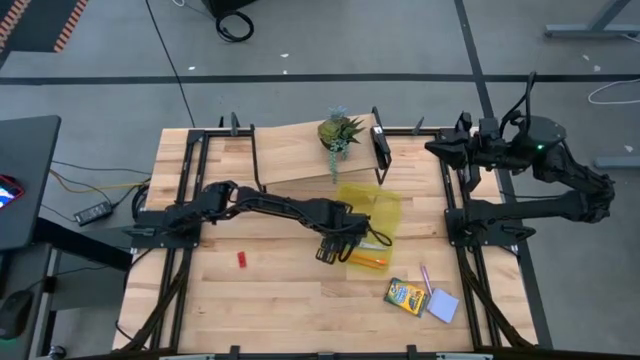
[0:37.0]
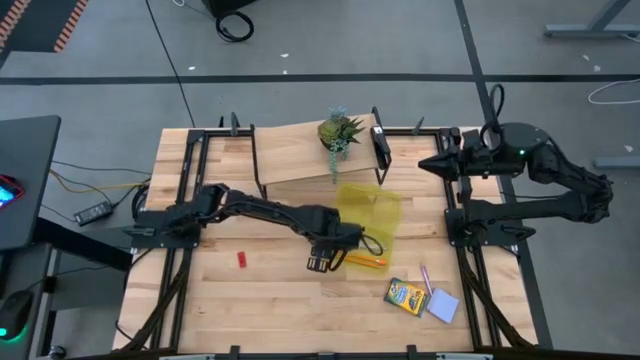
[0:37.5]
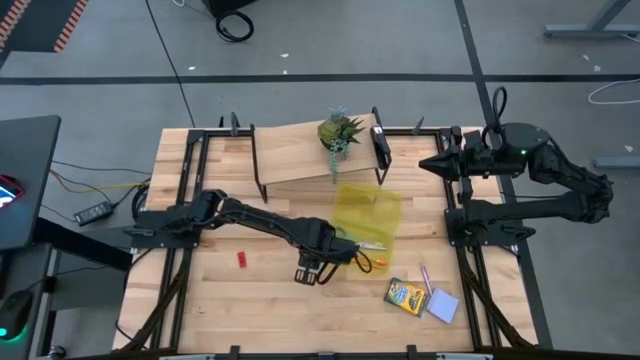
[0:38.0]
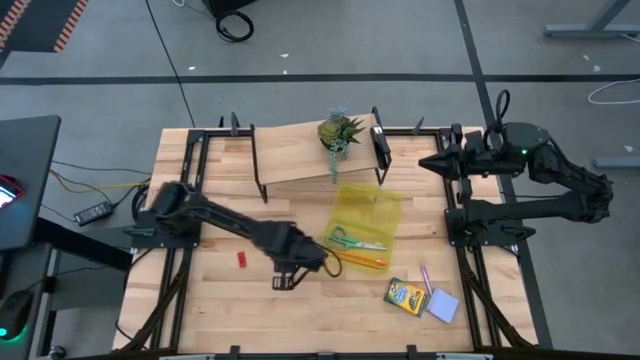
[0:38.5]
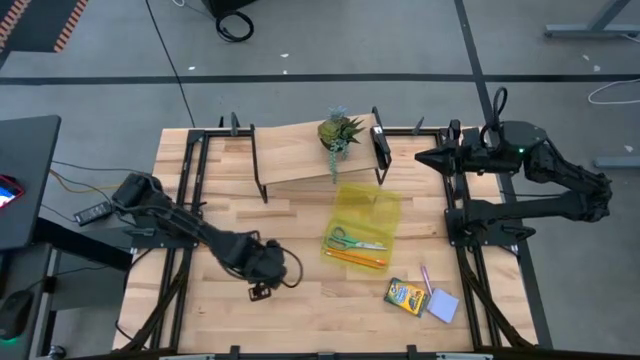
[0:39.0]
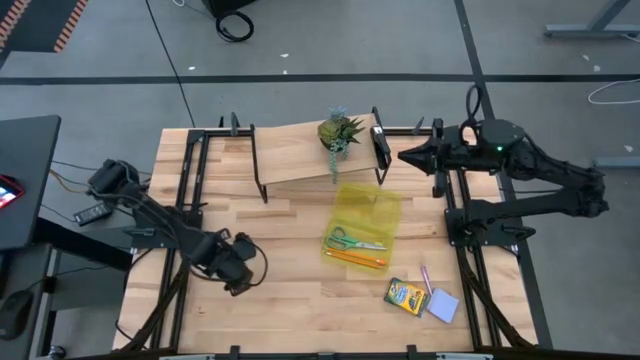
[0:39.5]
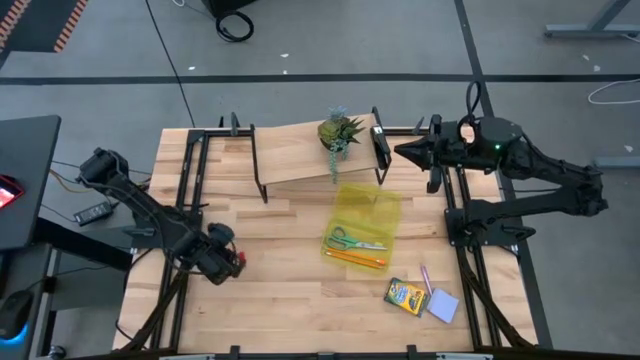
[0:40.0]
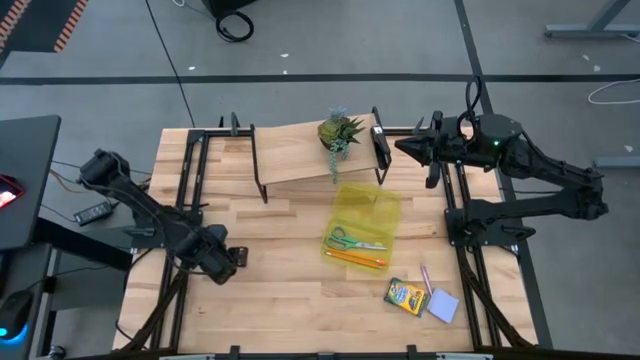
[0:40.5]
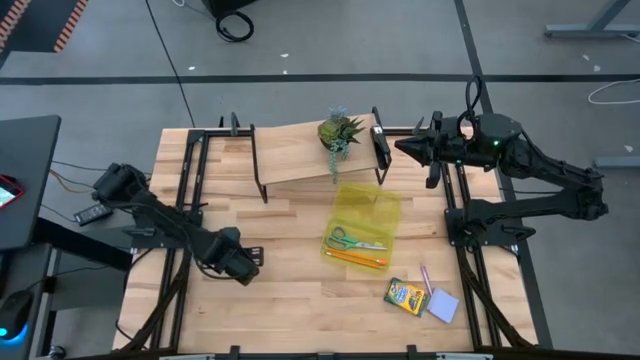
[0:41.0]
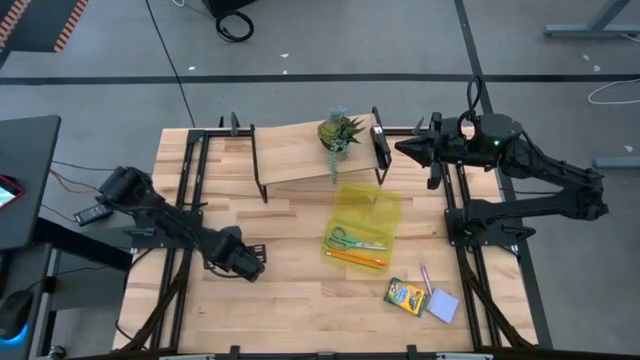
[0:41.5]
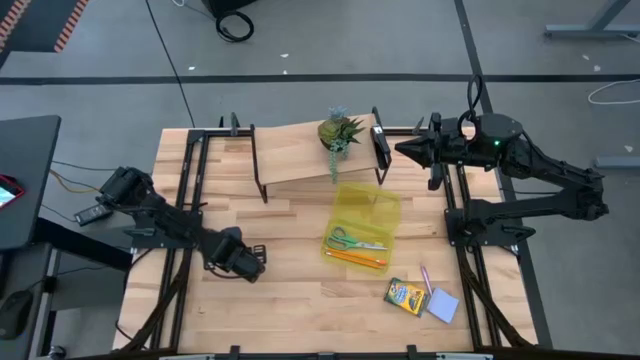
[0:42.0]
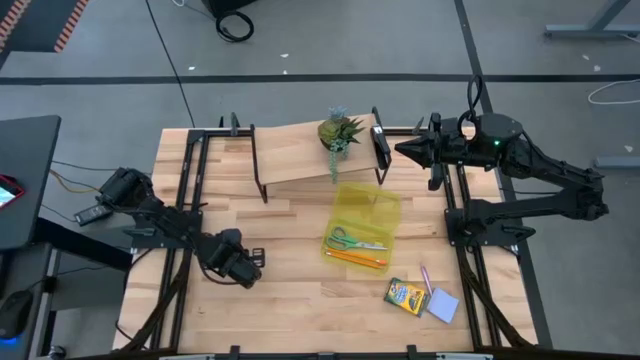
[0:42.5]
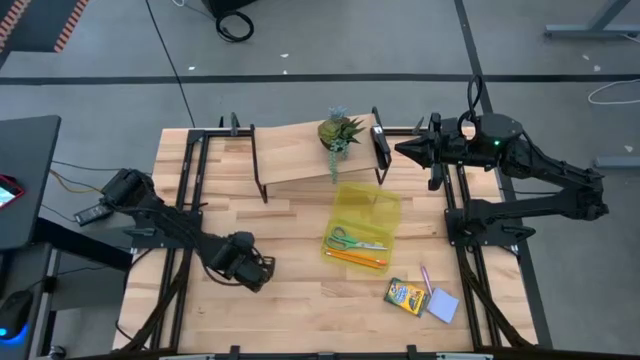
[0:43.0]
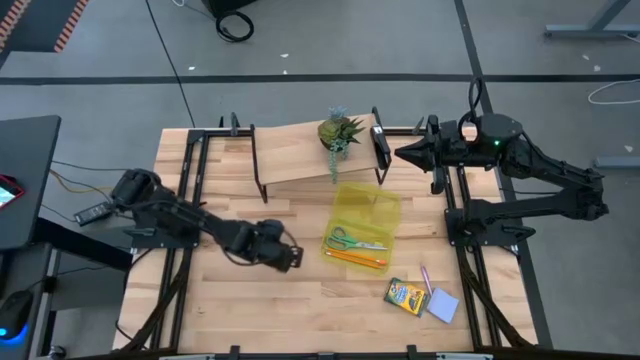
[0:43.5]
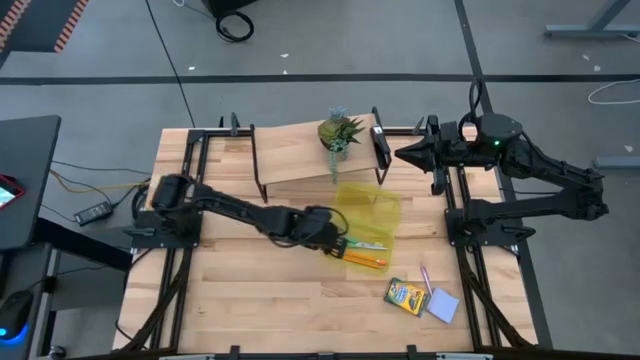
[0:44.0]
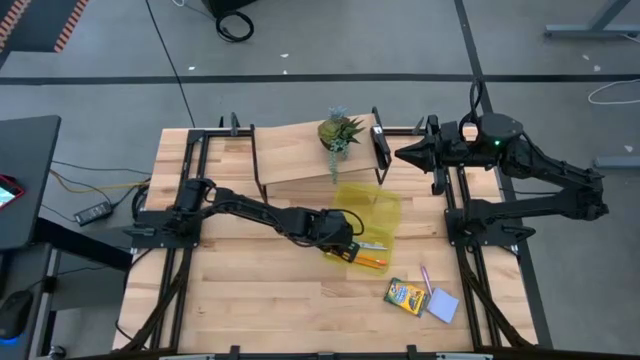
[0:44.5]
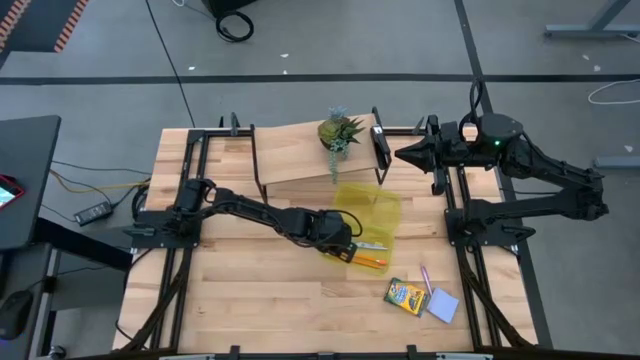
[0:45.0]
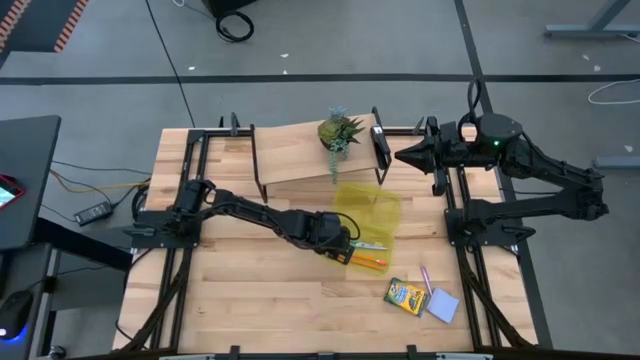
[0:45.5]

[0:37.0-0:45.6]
Task: Pack school essentials
Put the red eraser into the yellow supply box

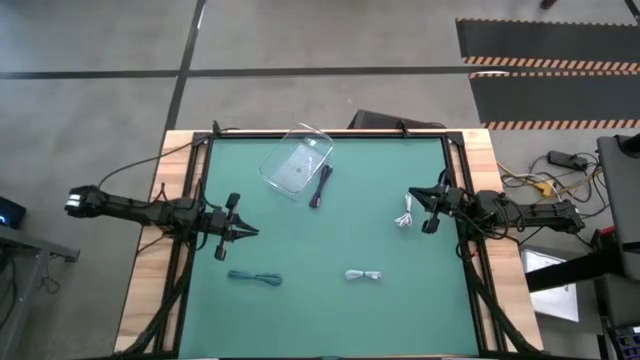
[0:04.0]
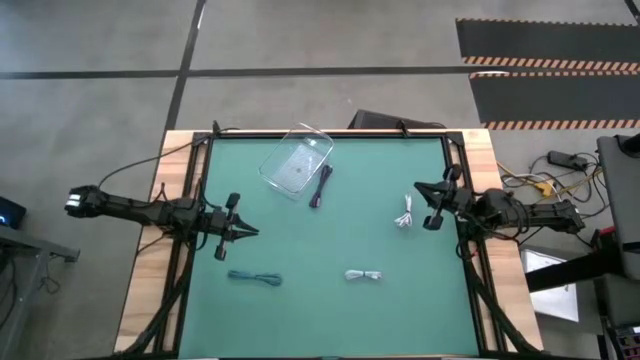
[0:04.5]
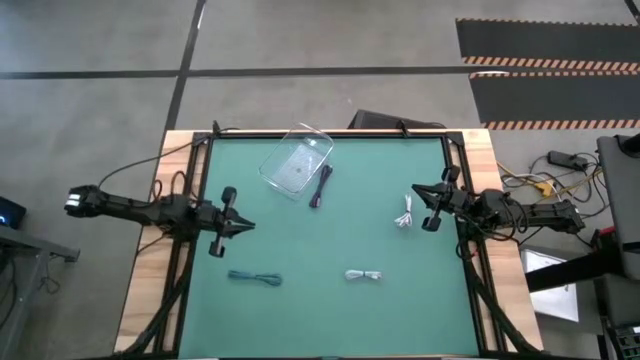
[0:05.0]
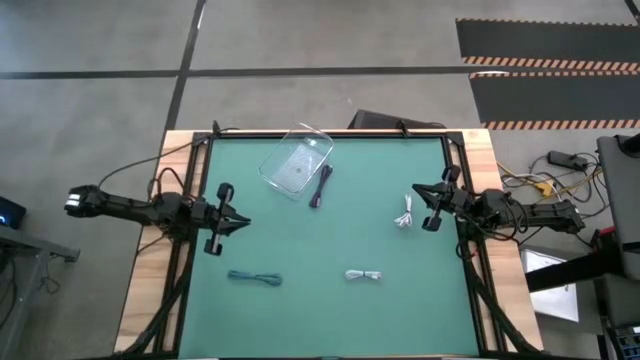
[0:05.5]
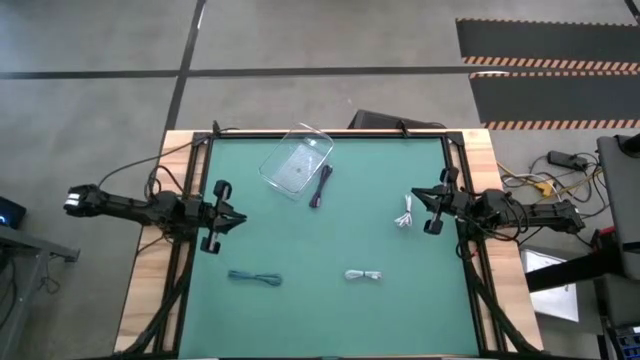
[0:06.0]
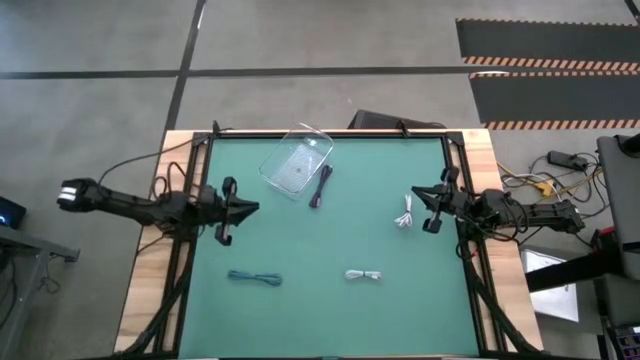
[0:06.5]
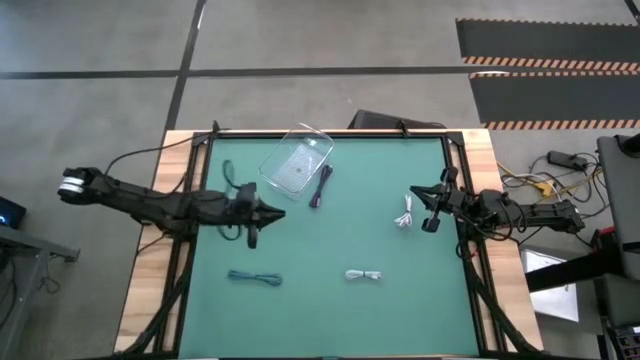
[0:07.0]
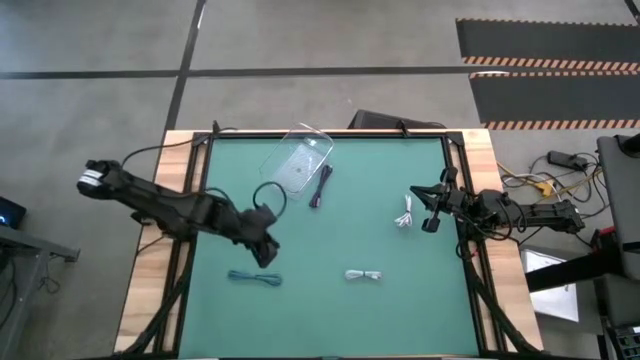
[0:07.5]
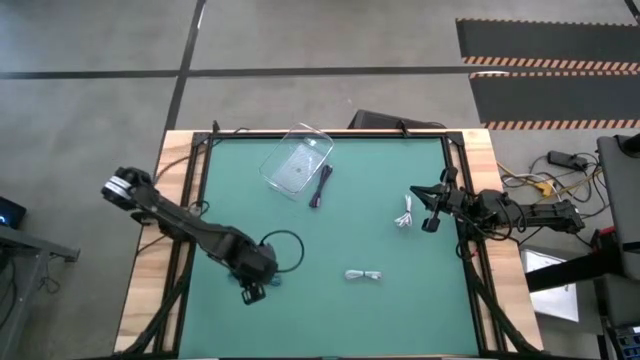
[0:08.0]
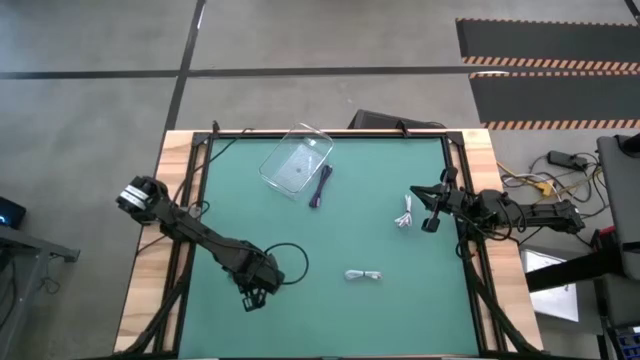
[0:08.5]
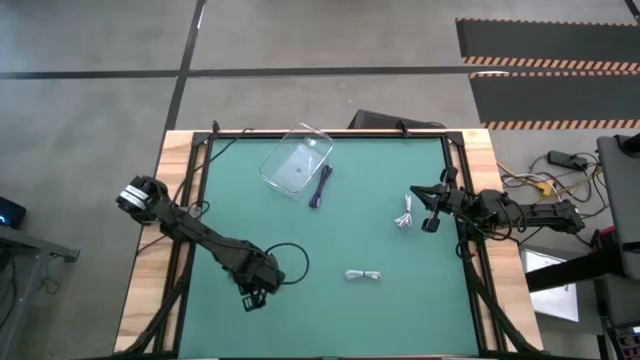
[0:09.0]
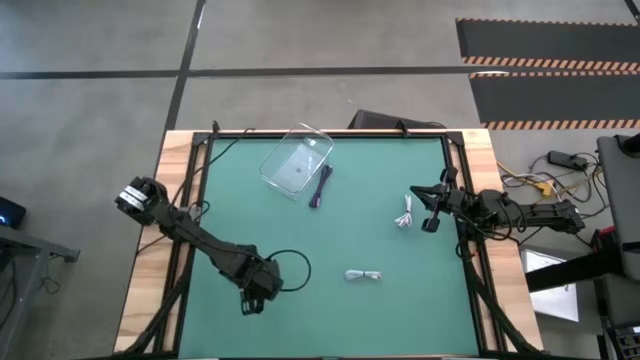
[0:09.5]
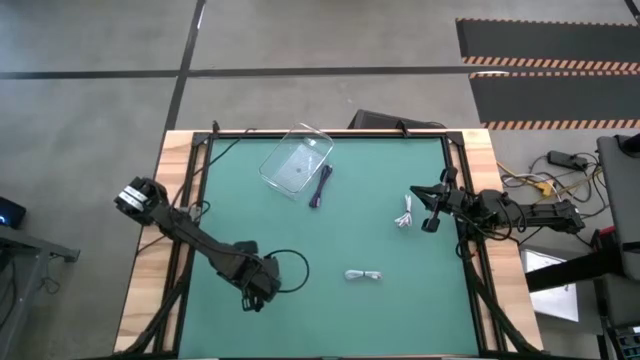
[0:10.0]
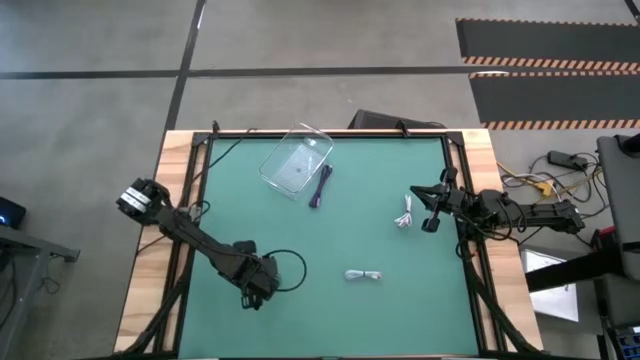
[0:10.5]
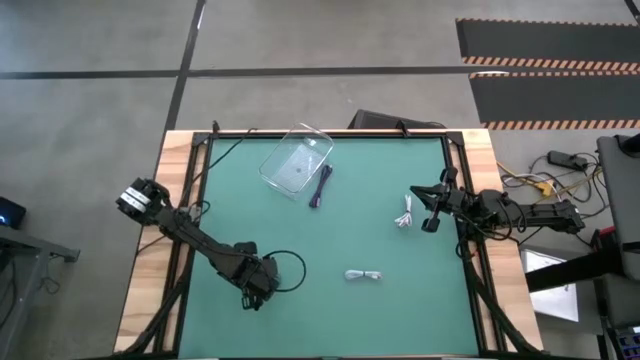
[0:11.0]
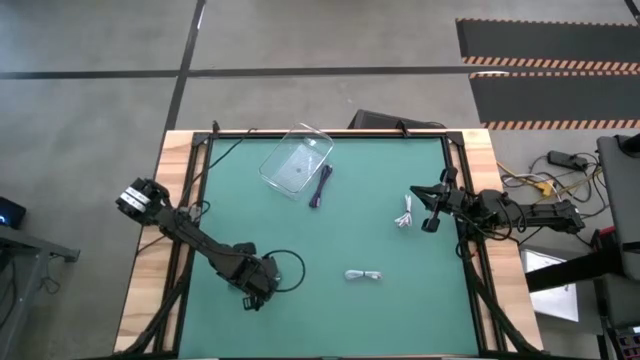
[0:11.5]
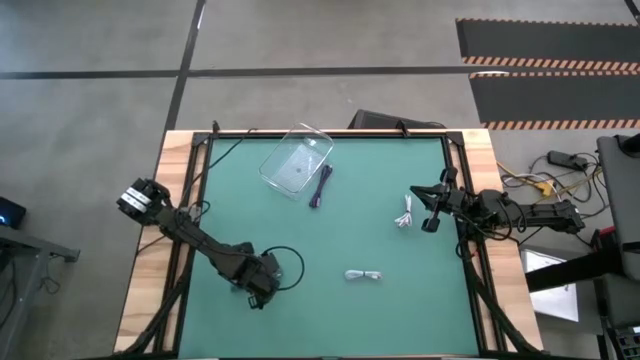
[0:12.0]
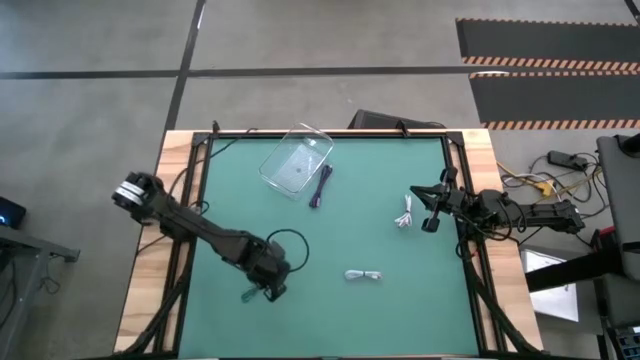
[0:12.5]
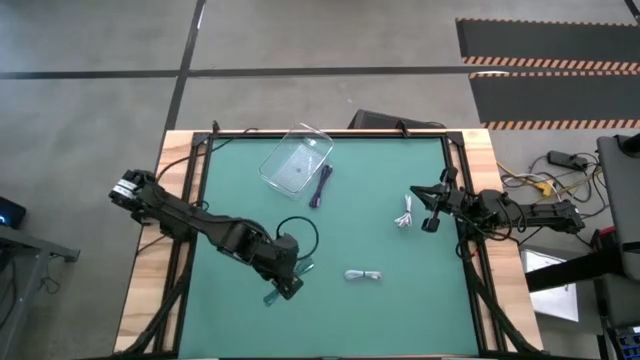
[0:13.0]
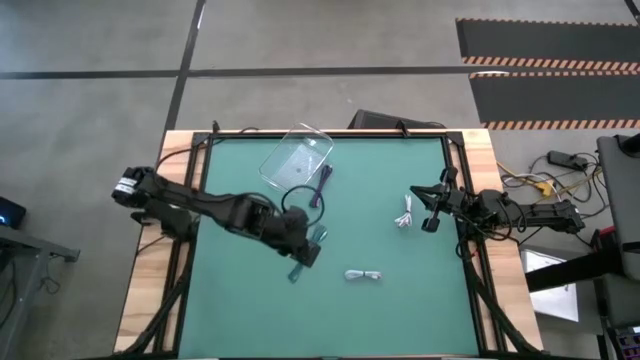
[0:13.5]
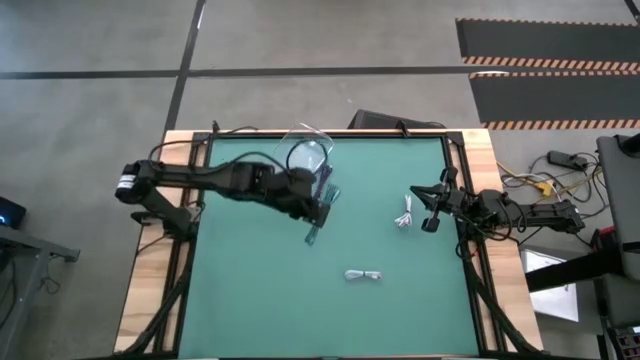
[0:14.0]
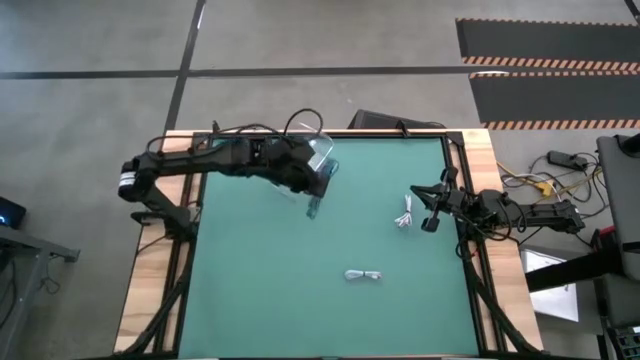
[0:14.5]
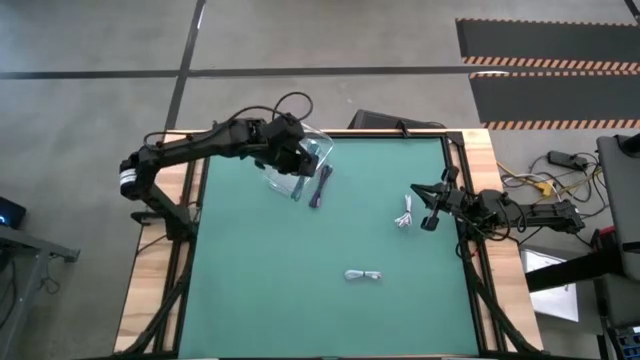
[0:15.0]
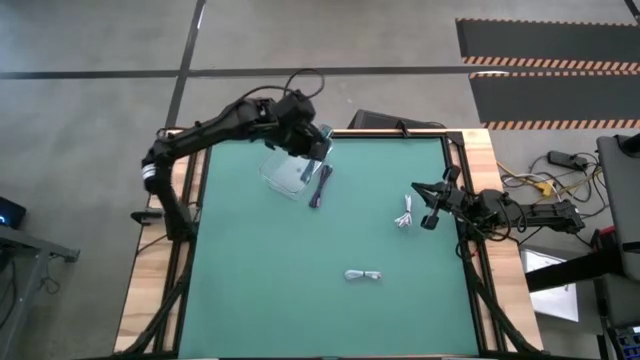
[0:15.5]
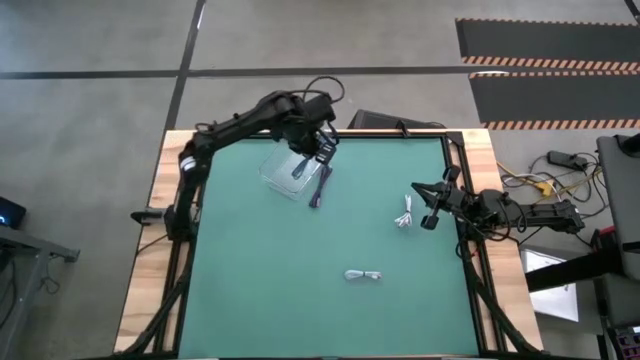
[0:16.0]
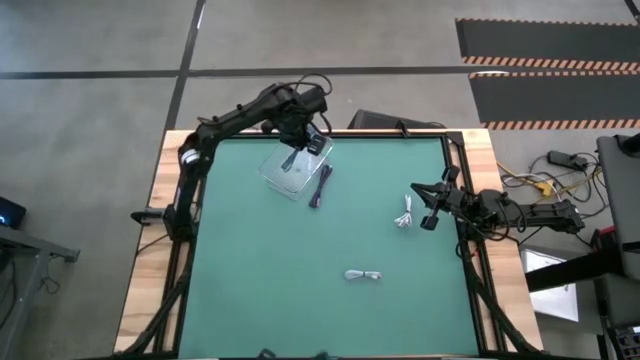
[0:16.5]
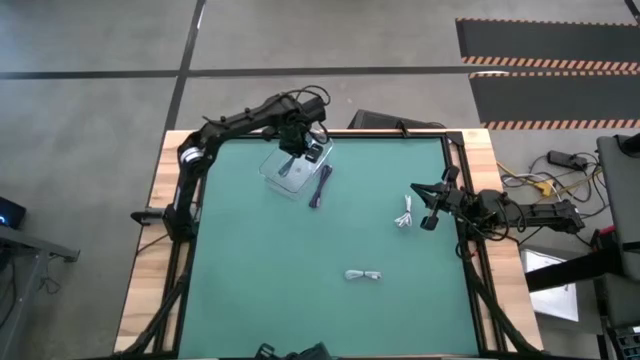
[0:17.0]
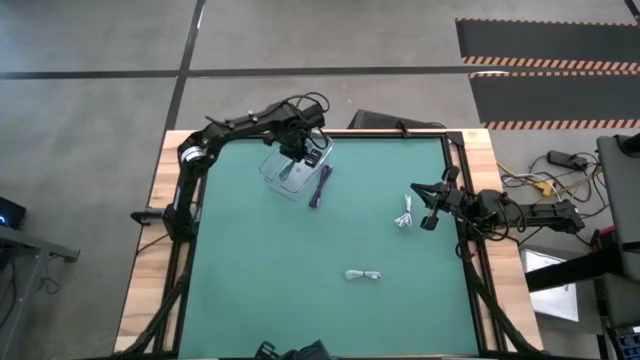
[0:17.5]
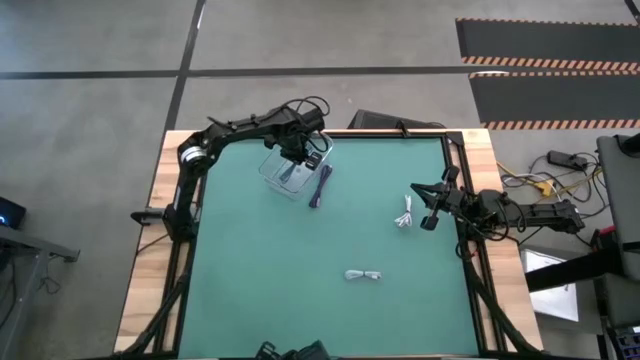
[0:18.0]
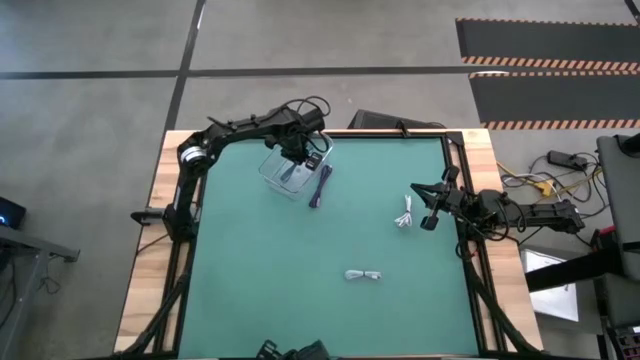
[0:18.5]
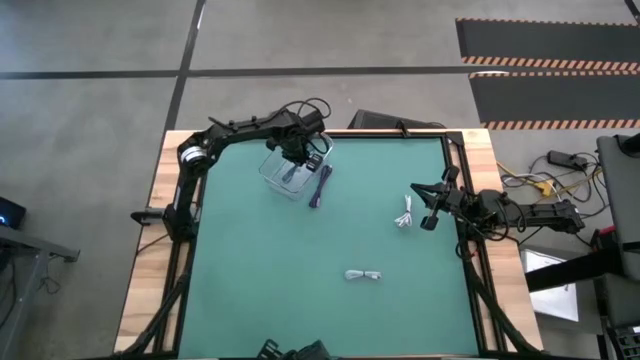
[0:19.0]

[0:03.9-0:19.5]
Task: Pick and place USB-C Cables
Put the black/blue USB cable into the transparent bin
